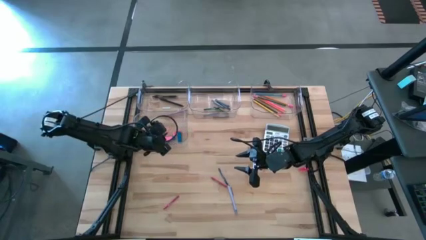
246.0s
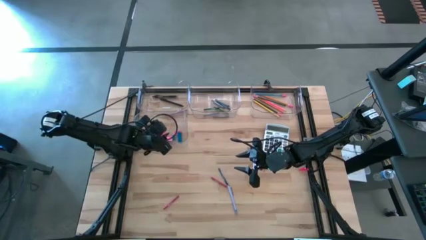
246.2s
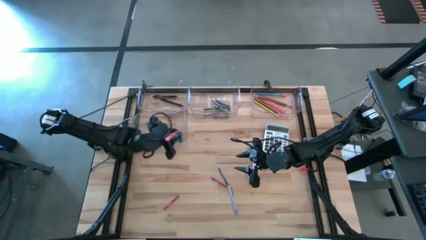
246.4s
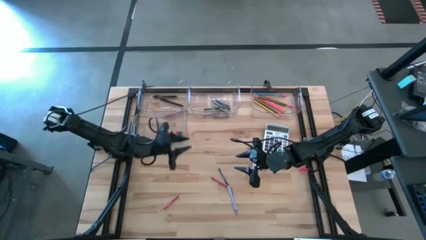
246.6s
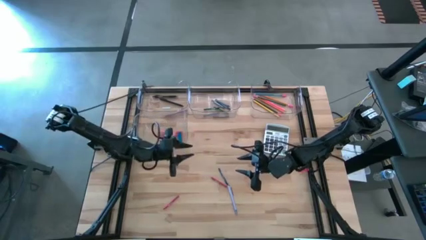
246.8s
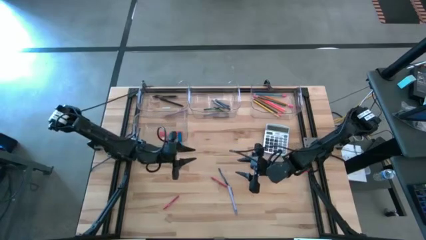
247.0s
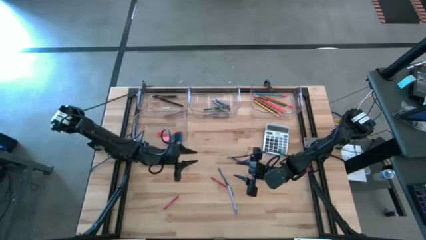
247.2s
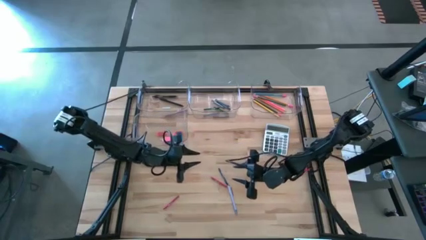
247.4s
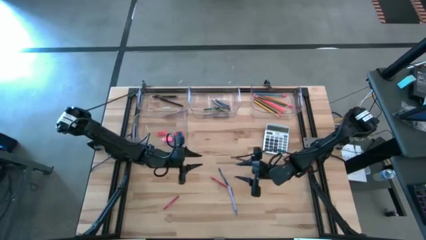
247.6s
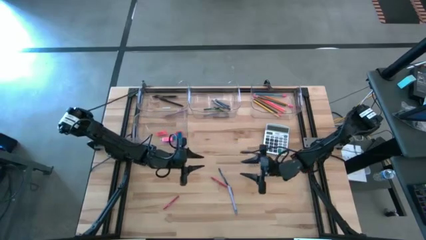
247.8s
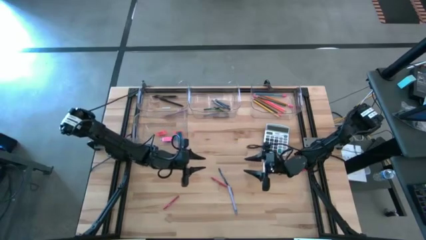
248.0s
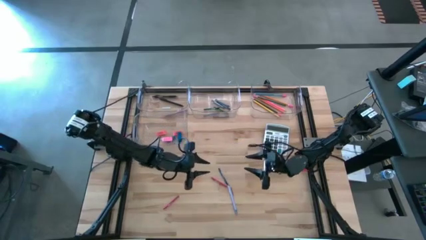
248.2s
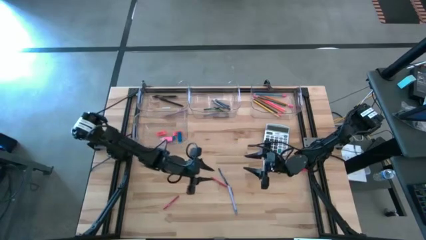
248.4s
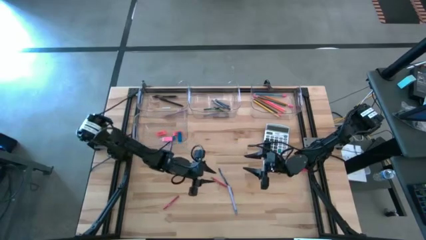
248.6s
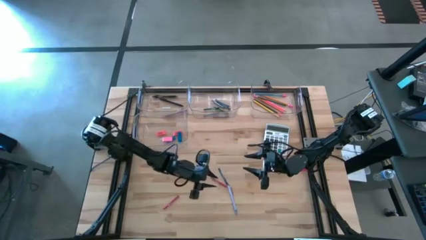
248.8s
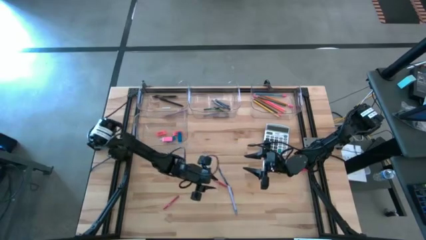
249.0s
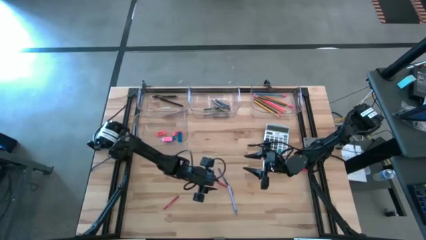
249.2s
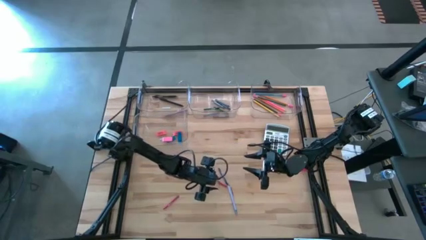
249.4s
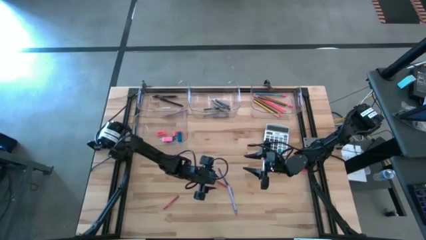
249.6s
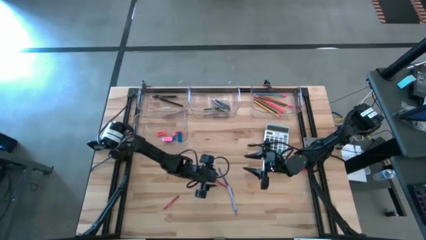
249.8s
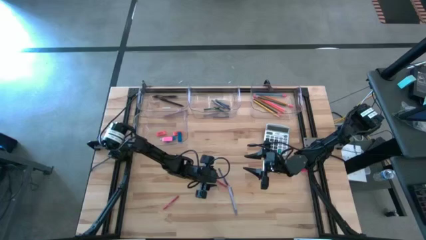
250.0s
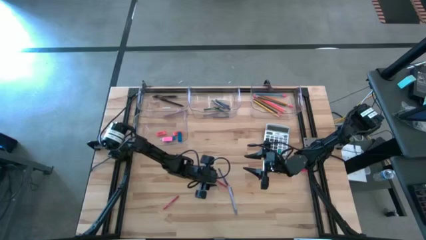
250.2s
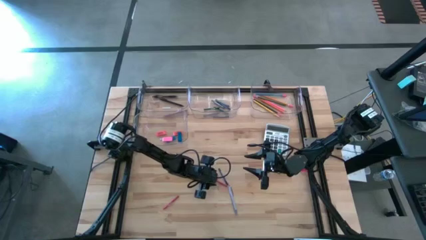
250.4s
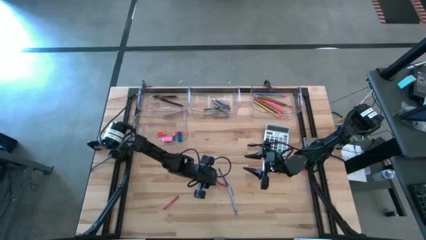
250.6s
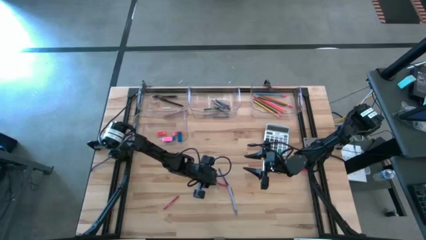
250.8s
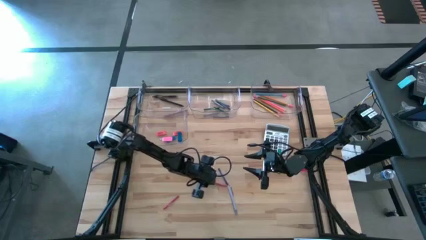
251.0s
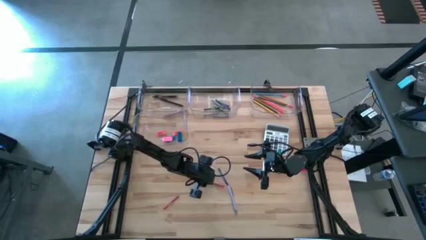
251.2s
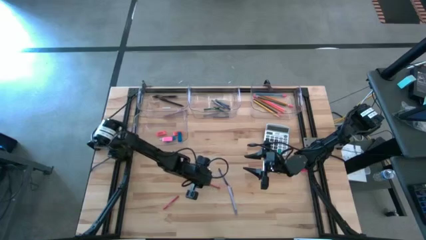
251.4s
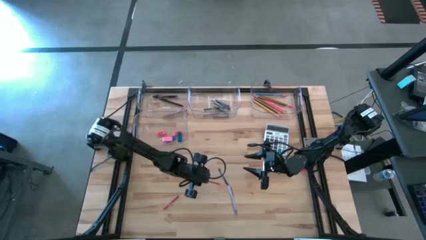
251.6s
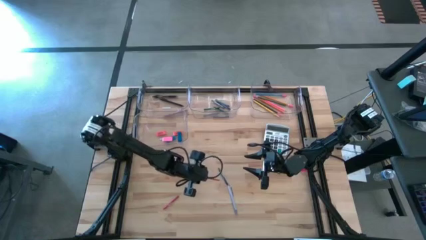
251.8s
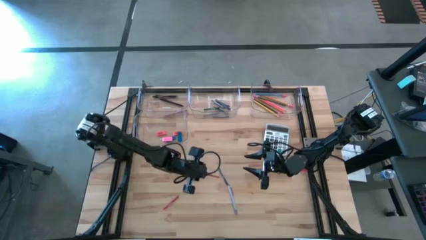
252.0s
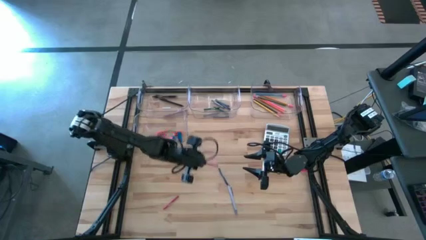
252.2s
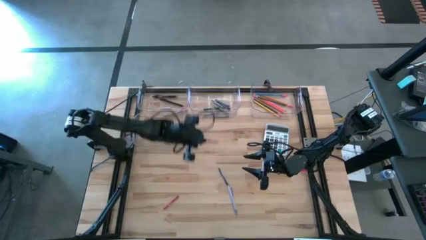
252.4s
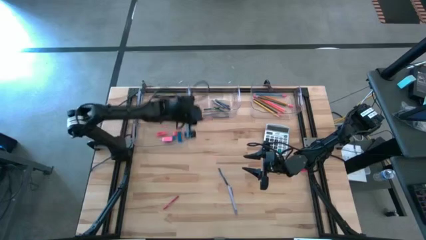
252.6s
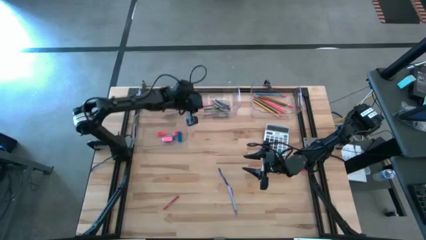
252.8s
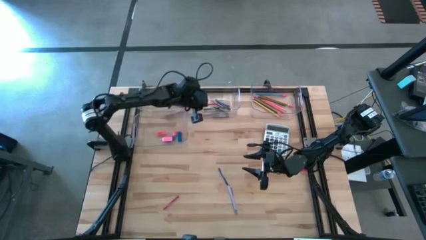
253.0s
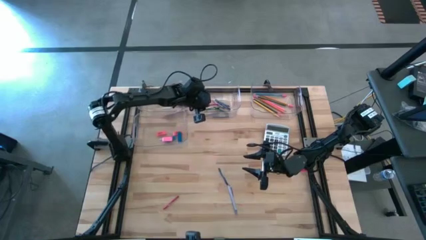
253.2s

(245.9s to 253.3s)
Task: Sort crayons/erasers/pens/pencils in bins
Put the red crayon into the top center transparent bin

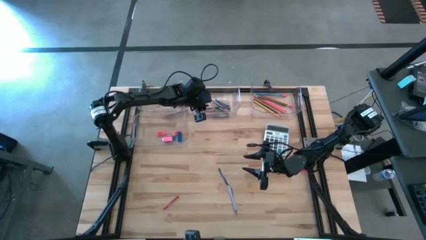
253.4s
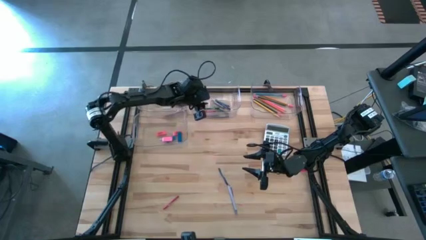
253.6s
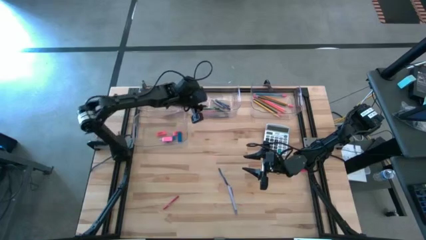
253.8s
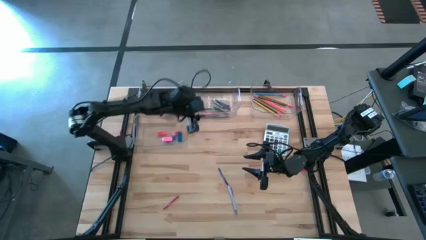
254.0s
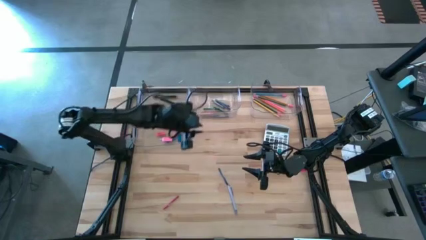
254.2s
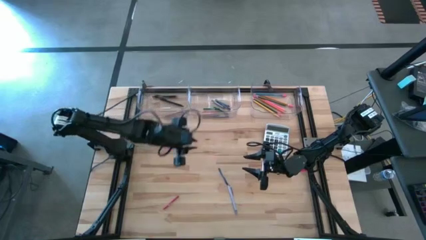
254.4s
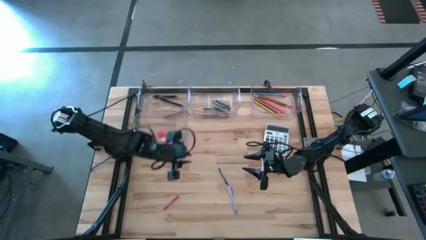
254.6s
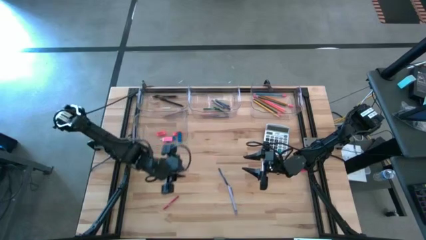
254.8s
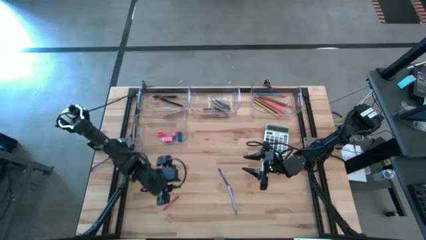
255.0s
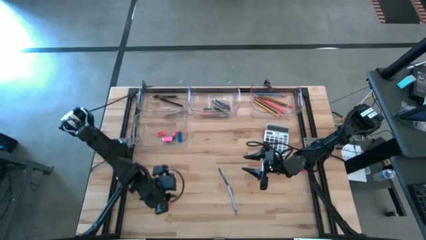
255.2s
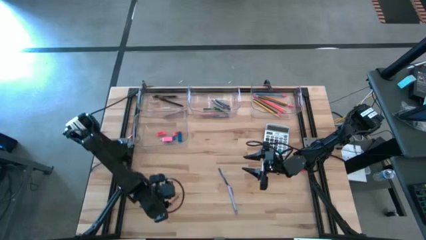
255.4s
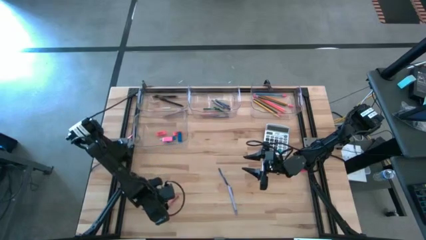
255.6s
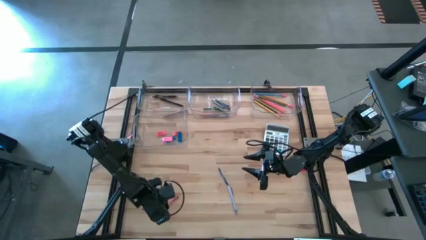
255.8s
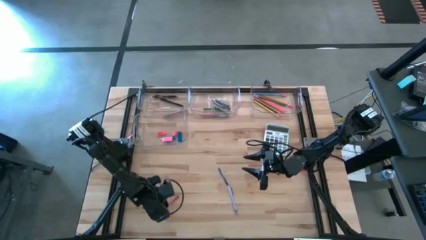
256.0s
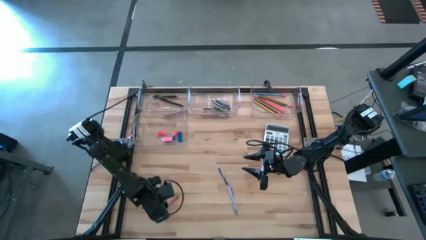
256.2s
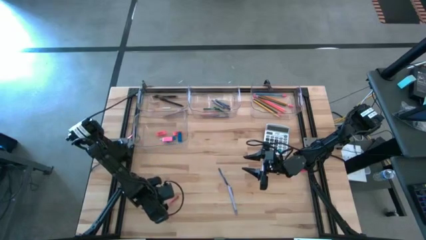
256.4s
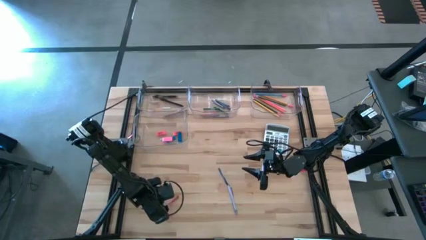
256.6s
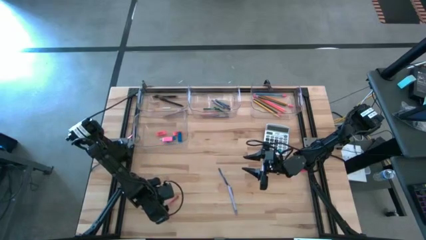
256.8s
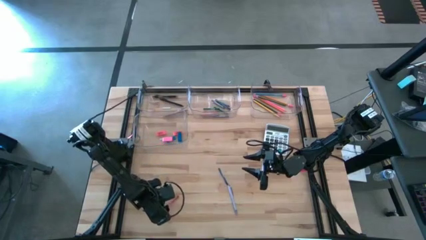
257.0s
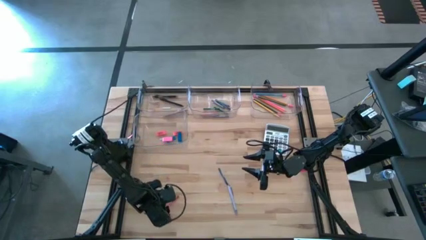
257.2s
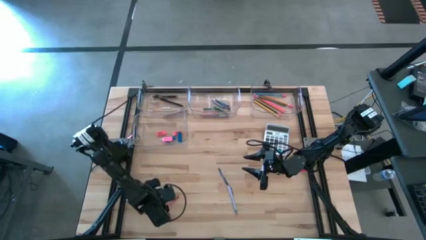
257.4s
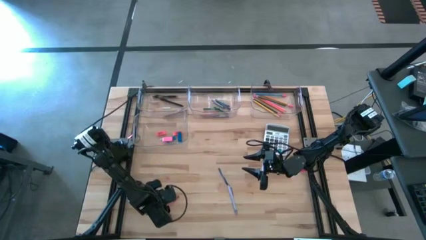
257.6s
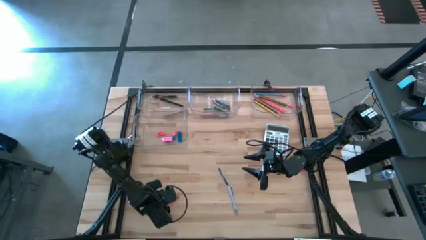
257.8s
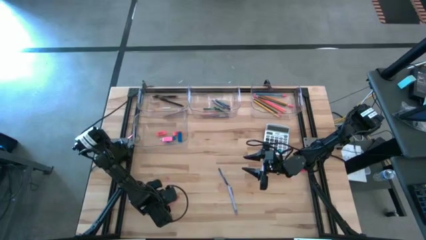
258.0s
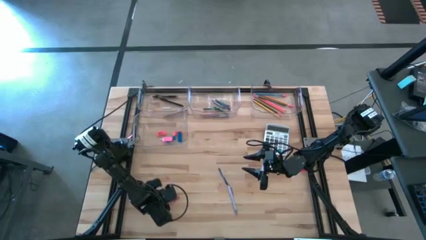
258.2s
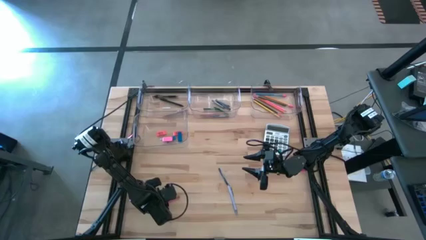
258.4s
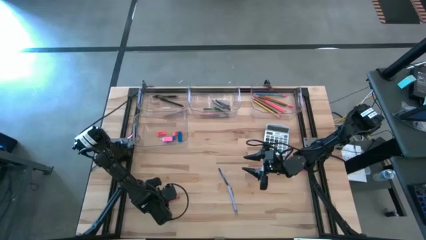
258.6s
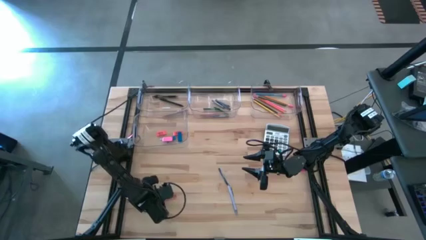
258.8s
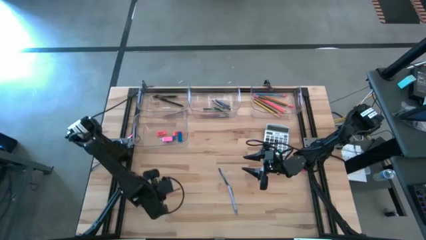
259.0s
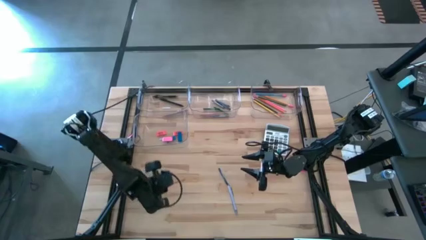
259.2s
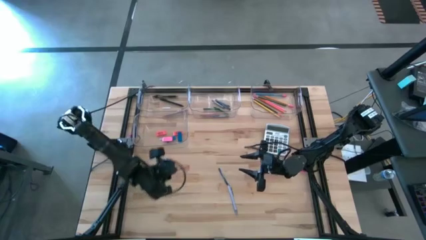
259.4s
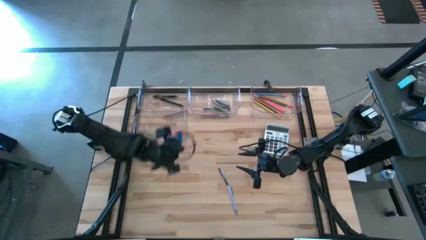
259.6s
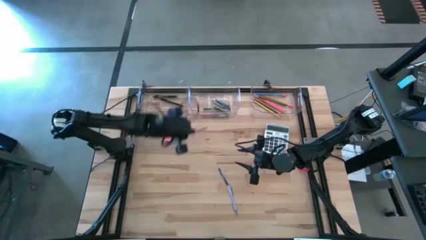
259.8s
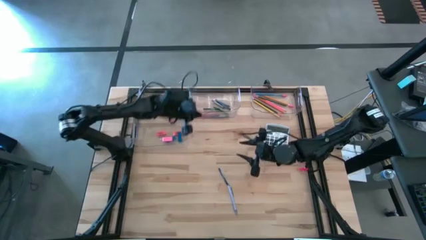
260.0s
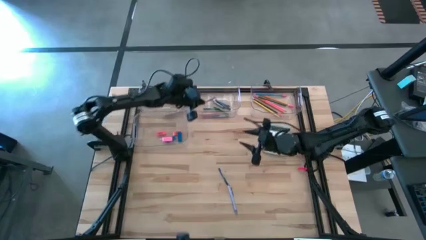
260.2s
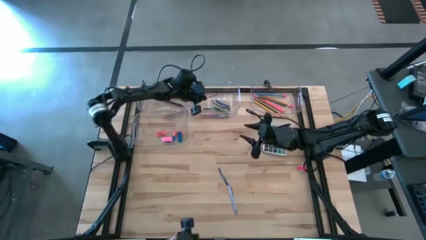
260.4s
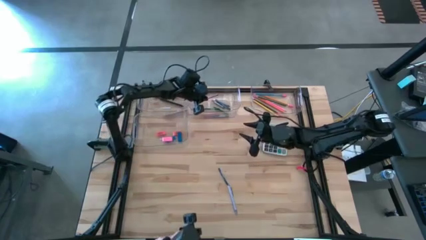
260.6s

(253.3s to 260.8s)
Put the red crayon into the top center transparent bin

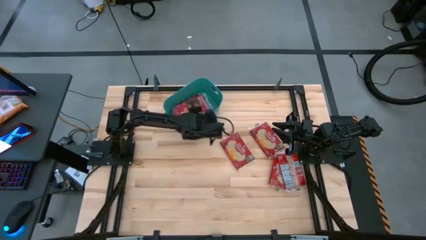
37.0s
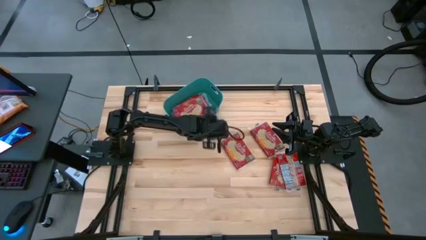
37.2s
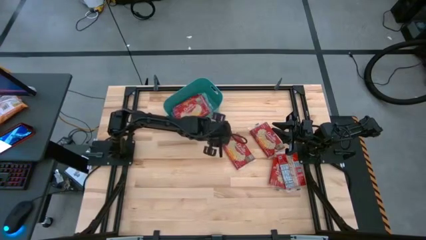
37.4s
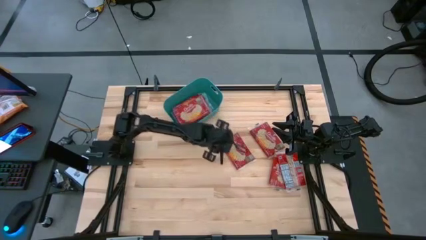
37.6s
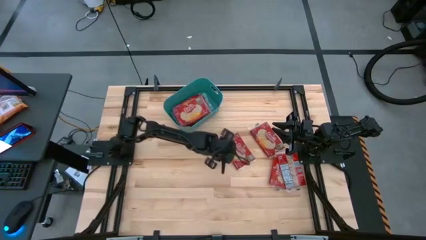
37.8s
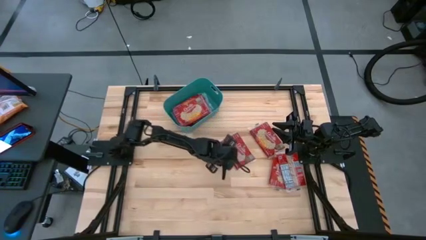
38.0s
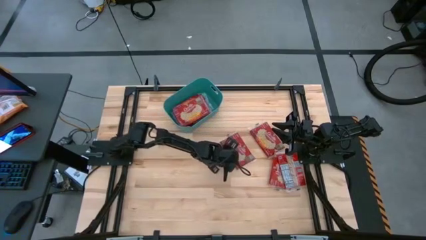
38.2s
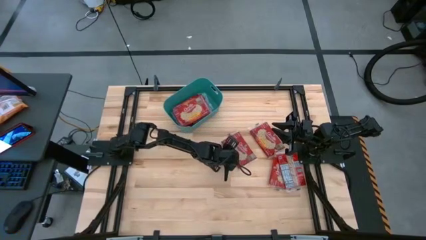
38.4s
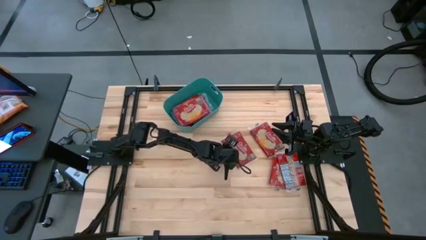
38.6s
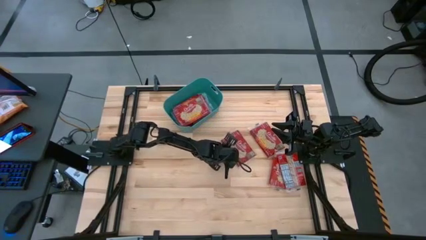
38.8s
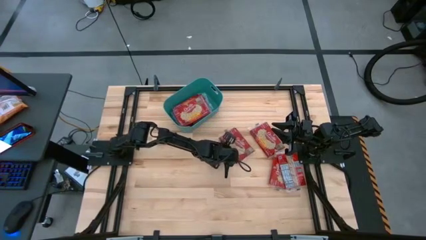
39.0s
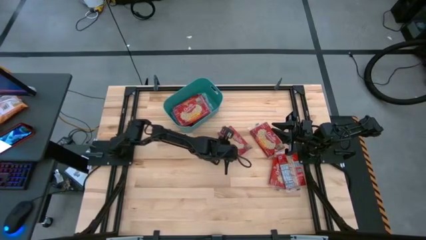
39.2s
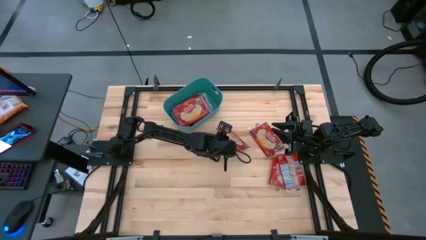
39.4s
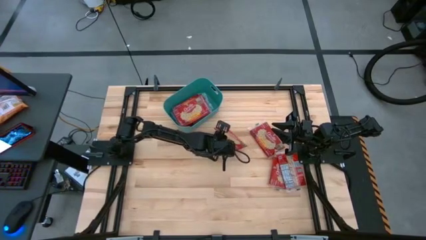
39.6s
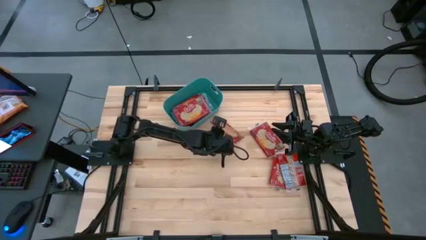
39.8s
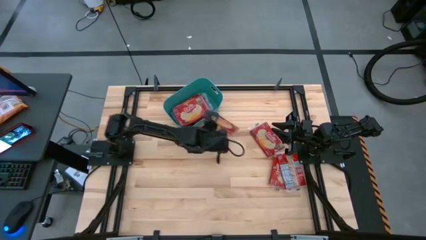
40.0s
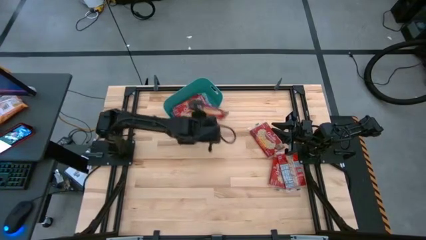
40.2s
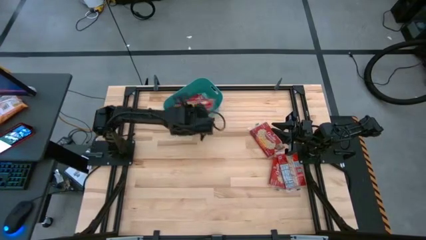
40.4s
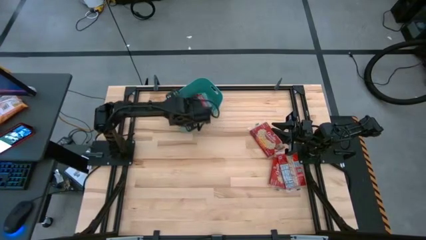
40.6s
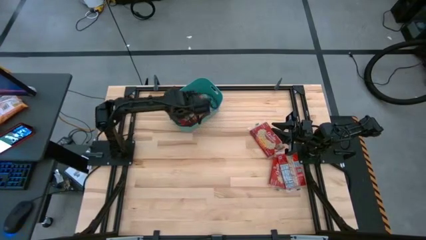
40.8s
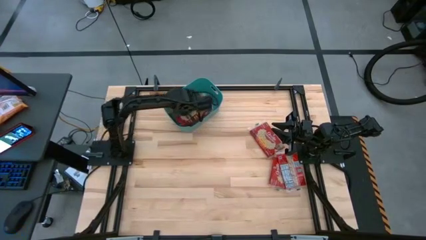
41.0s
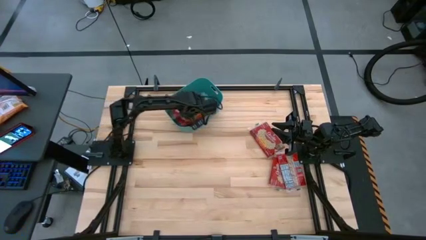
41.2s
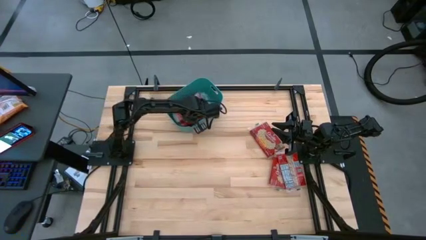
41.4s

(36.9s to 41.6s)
Task: Sort popcorn bags into baskets
Put the red popcorn bag into the green bin
